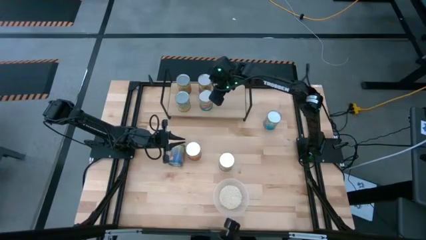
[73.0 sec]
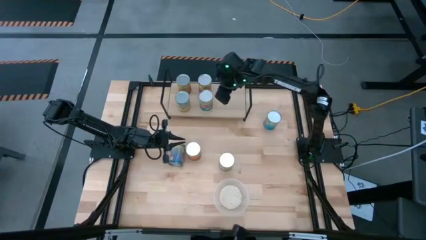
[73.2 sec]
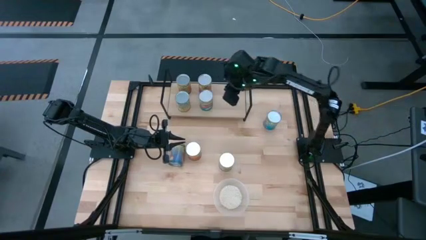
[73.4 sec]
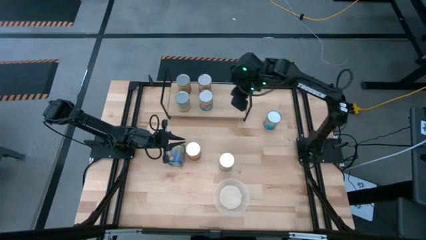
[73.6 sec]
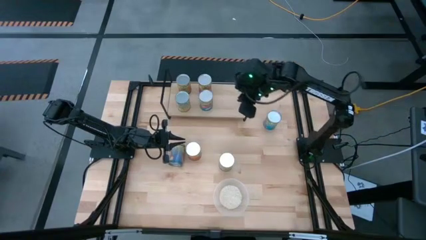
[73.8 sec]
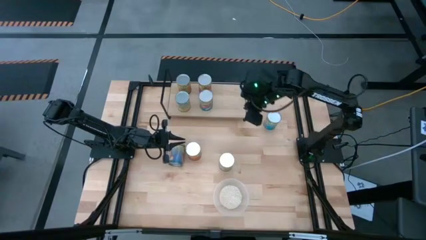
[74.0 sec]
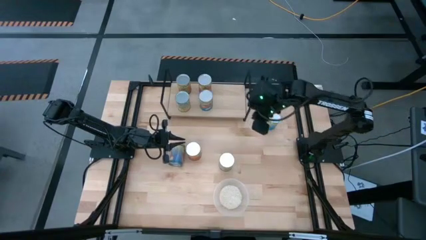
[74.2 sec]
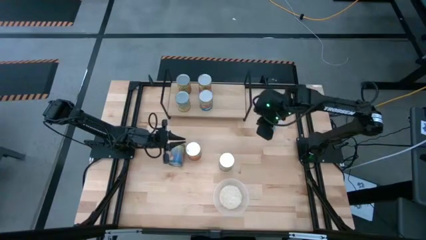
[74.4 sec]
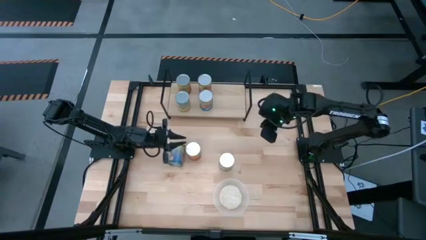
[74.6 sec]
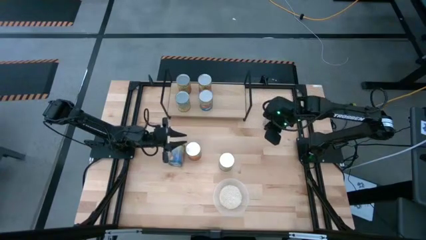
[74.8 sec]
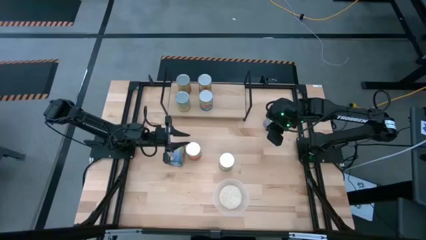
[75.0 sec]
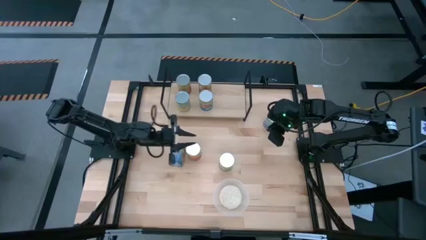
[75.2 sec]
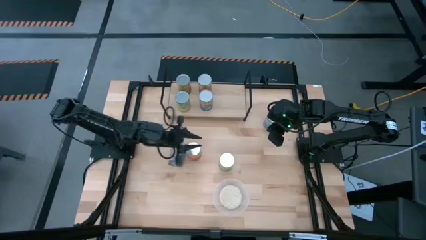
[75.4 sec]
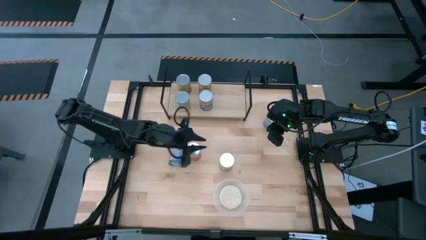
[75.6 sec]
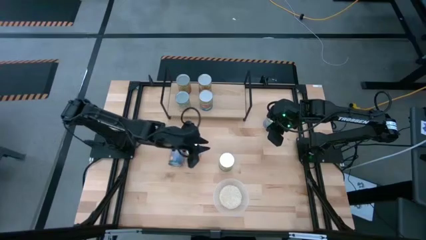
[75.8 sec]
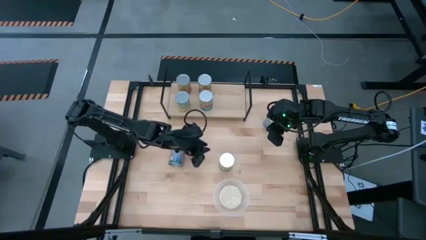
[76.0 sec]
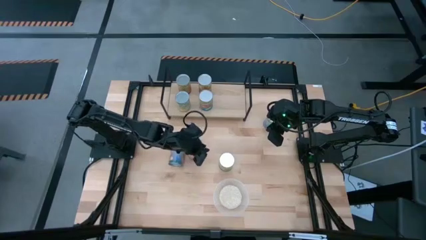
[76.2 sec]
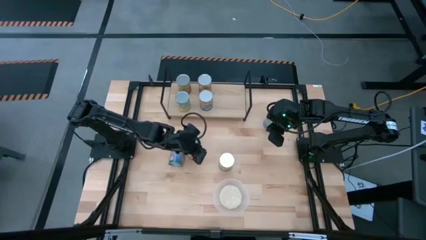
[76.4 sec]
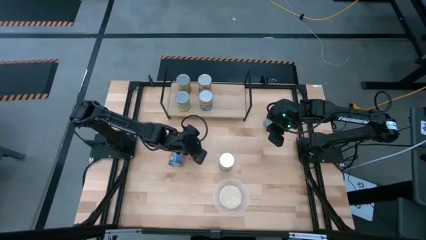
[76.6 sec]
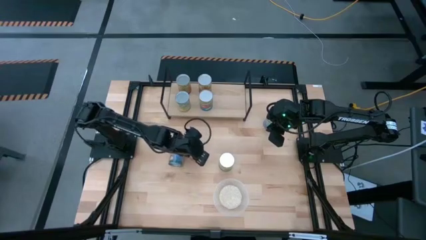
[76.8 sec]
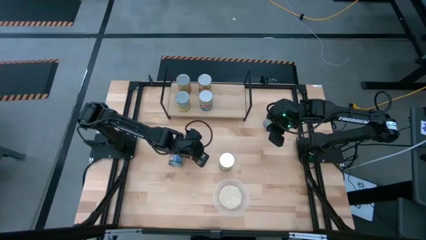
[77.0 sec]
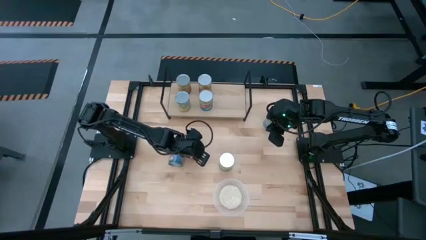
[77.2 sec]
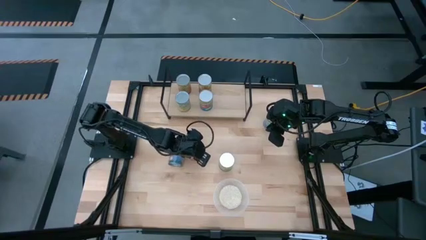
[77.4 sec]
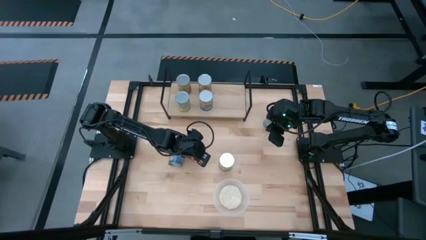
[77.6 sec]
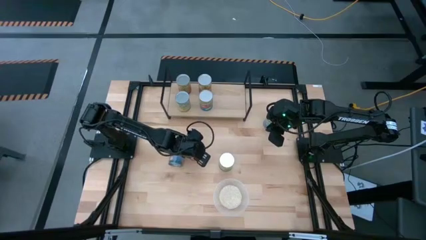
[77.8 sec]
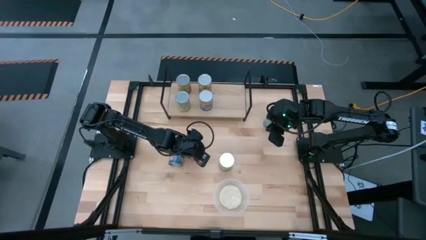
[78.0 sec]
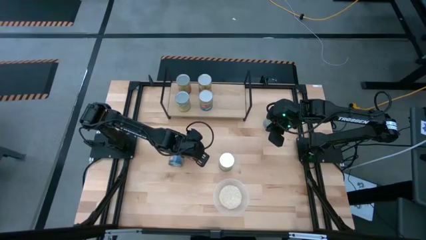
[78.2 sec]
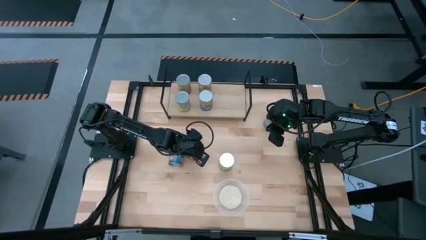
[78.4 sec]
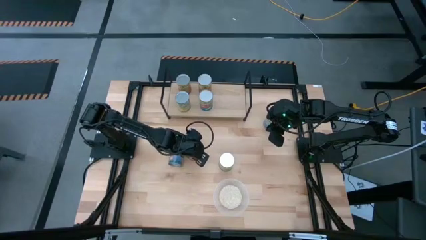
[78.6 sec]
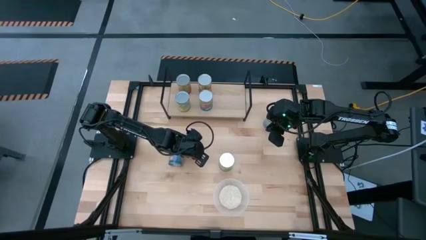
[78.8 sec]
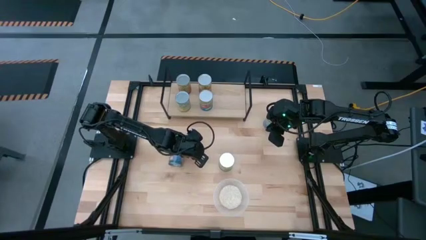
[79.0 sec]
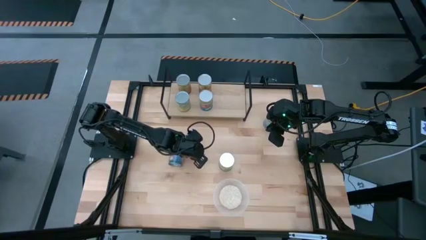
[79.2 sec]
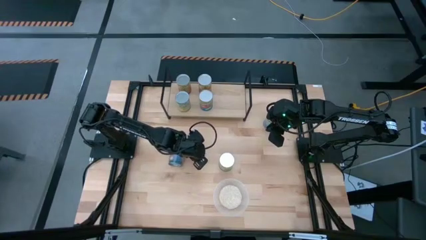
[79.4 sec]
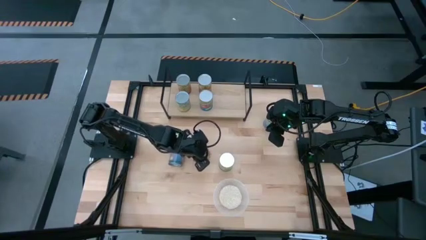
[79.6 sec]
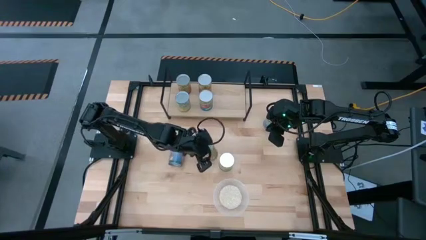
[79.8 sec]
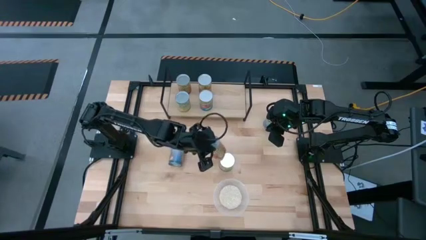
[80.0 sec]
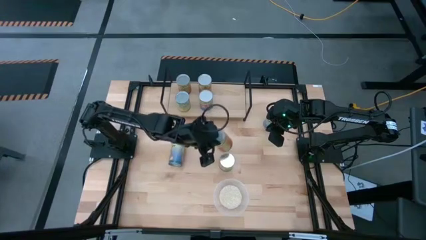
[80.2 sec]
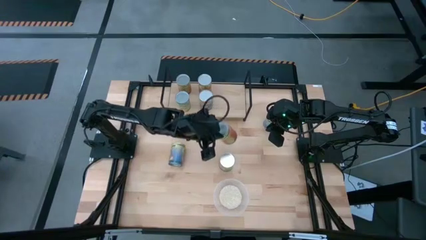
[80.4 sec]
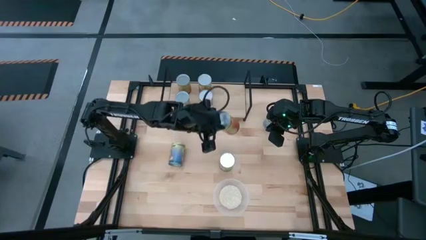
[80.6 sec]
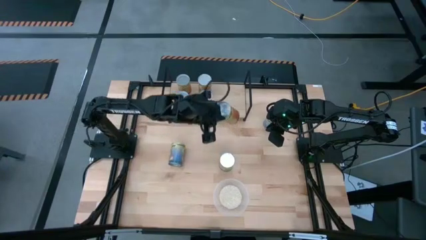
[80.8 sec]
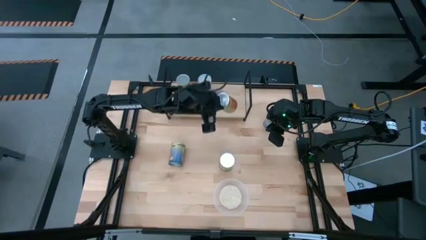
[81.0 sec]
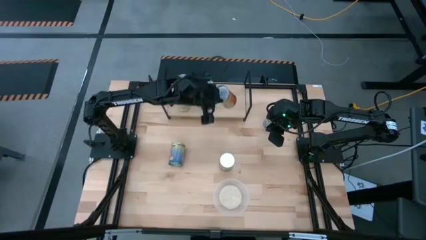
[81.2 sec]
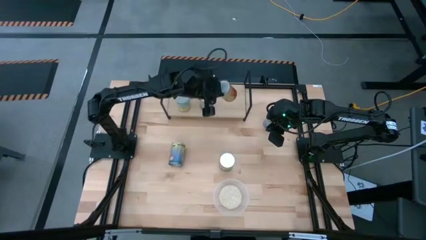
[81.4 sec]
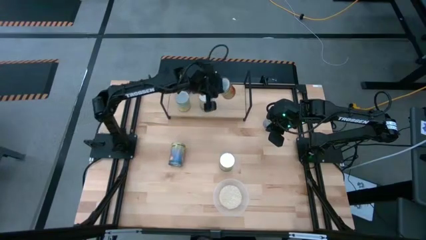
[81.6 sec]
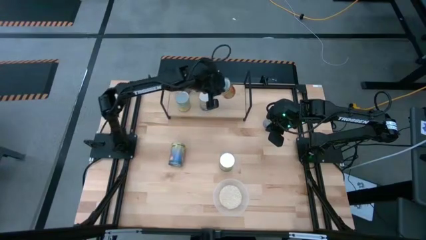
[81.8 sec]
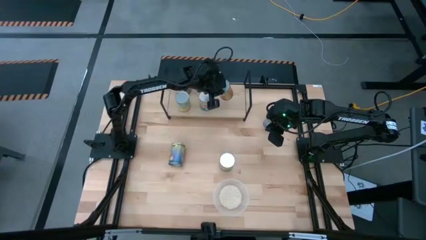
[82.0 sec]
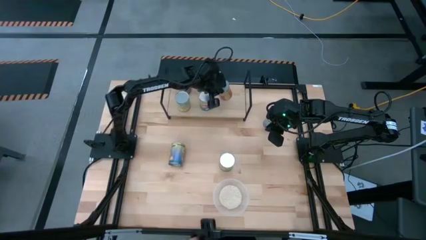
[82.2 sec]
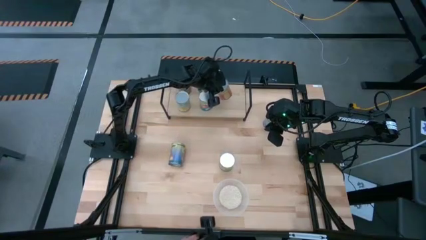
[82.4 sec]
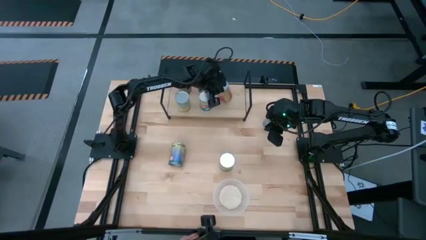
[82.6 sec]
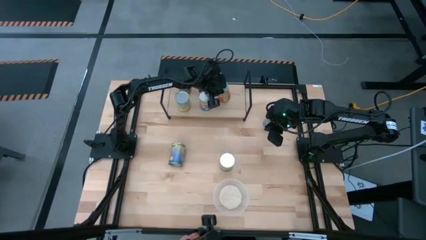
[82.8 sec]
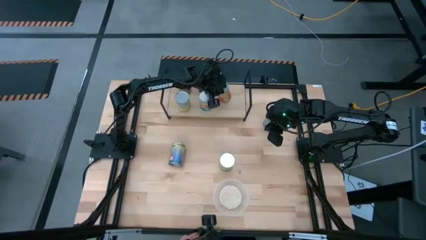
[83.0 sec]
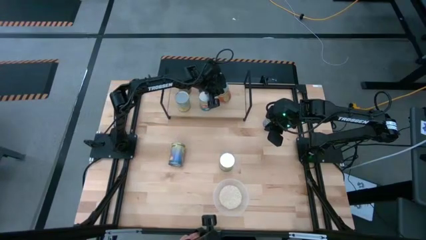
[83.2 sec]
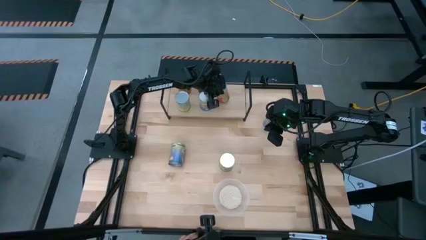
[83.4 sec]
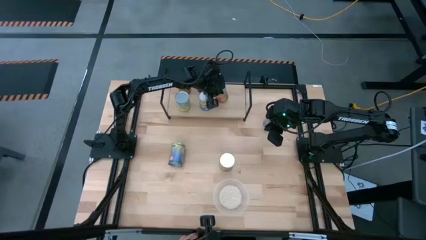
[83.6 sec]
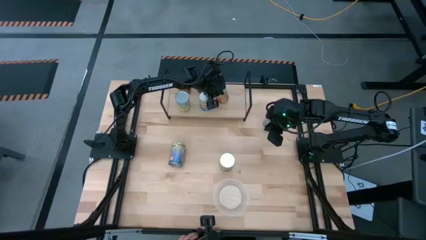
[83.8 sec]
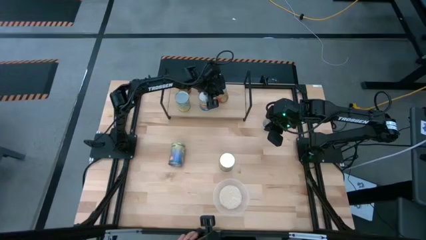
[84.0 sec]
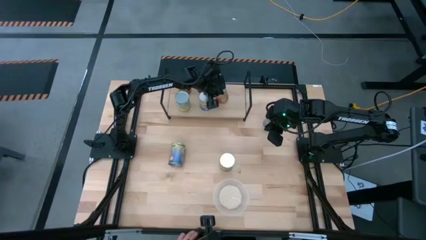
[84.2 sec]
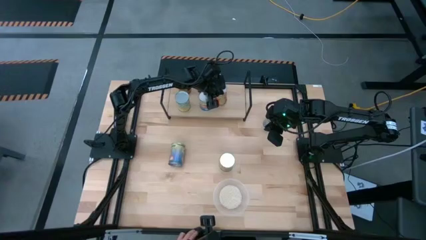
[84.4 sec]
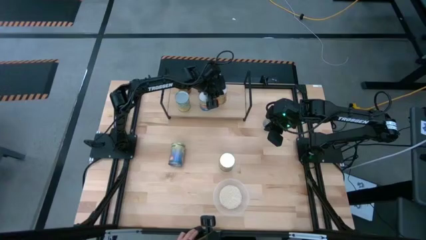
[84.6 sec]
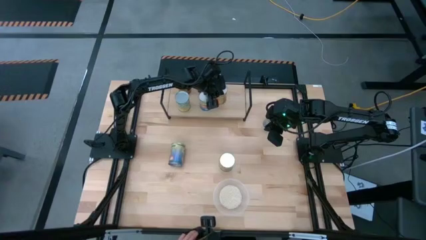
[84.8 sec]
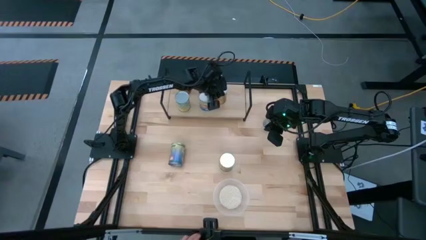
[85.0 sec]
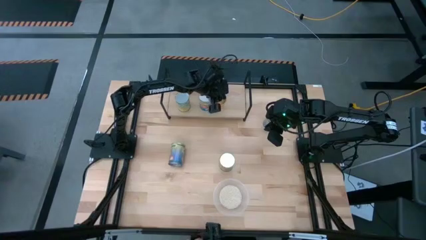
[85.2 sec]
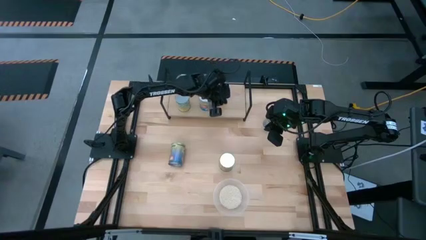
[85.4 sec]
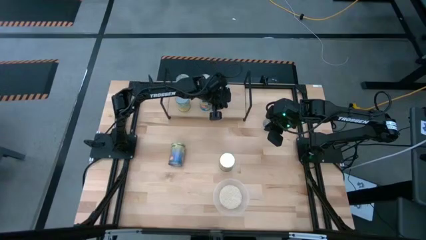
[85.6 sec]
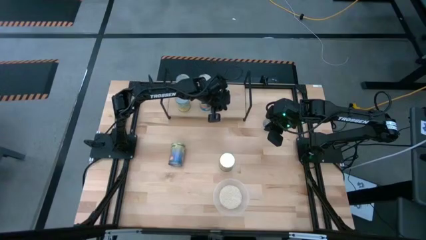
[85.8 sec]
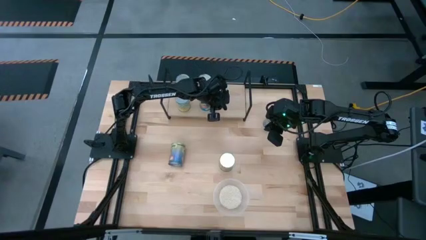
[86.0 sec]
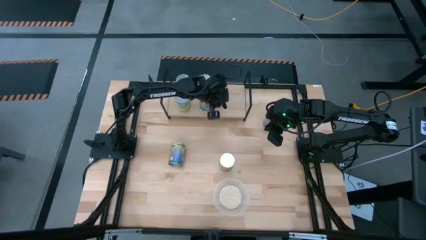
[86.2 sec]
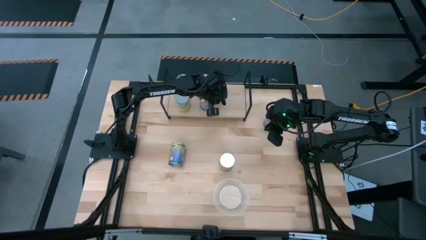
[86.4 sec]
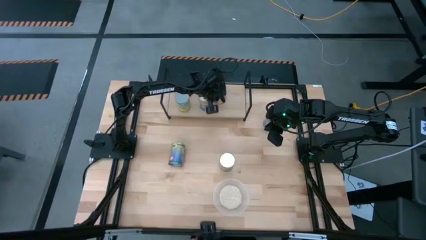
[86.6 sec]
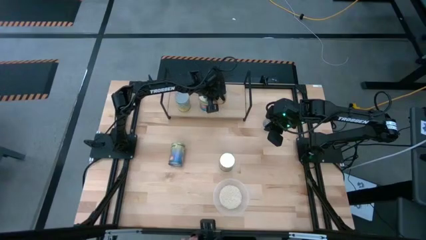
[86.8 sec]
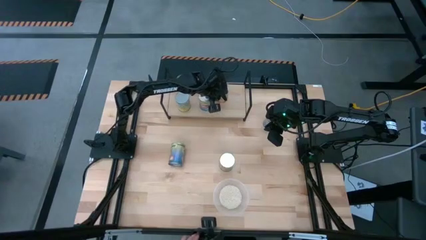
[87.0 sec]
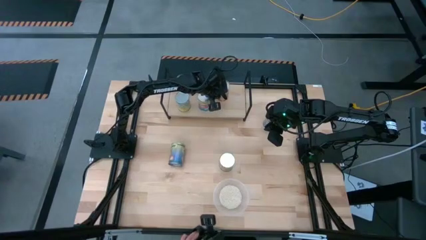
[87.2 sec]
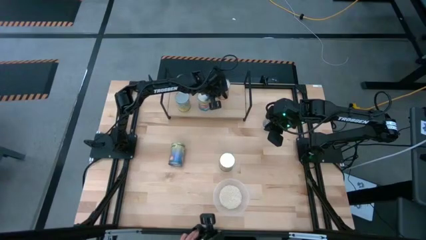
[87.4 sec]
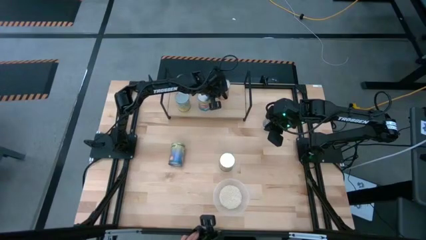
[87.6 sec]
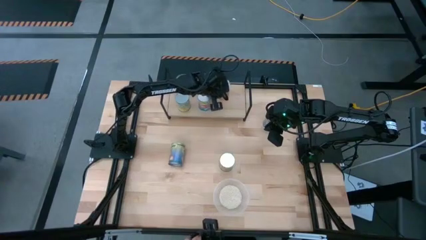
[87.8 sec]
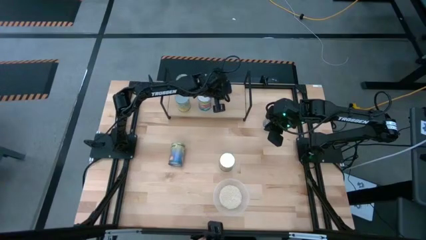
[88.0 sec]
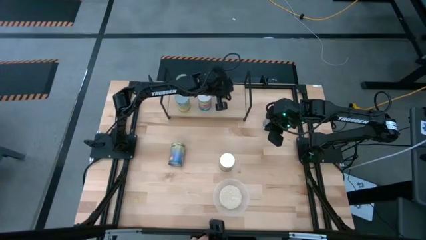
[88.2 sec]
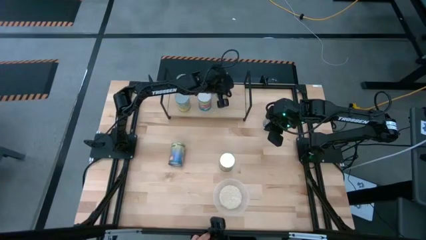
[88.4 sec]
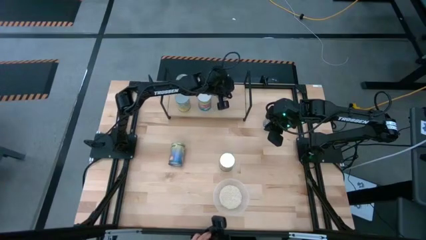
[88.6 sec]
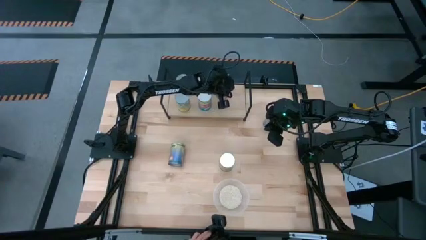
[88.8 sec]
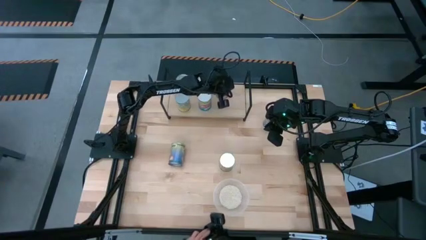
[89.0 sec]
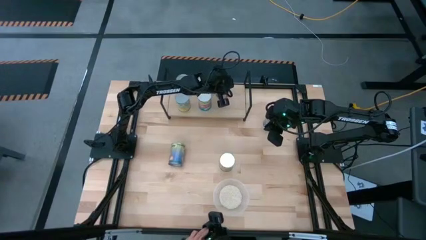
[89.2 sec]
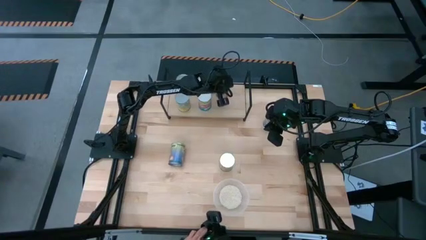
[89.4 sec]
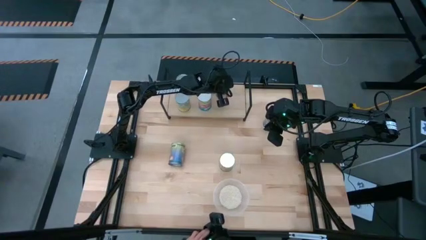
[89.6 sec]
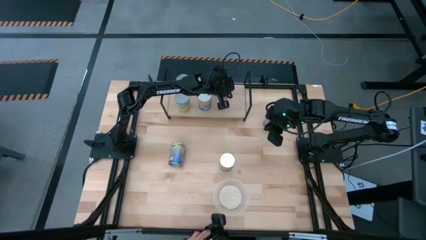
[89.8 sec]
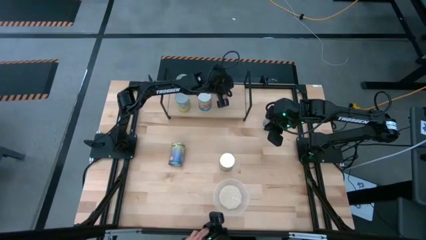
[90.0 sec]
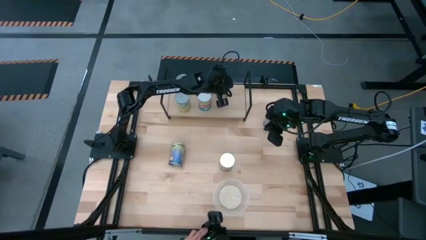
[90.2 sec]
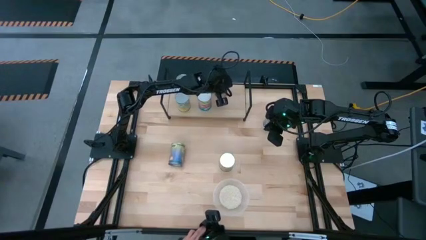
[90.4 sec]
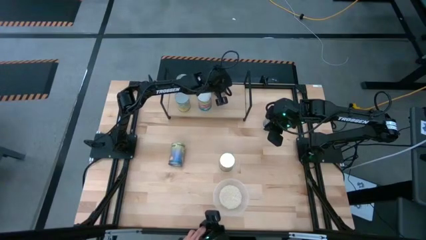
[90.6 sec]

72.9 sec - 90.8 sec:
Task: Pick and place cans onto a shelf
Put the canned pineapple on the shelf
